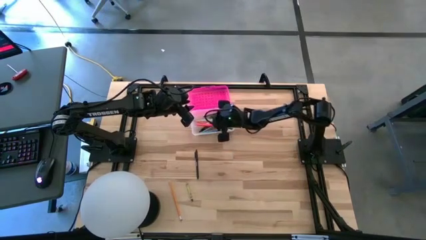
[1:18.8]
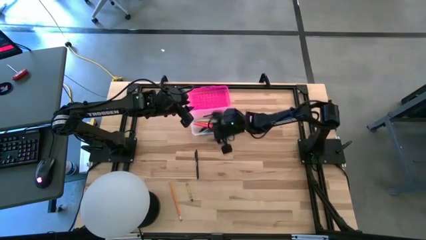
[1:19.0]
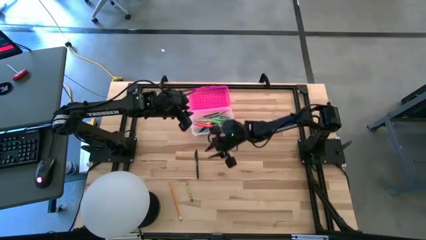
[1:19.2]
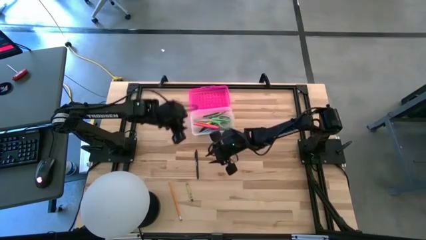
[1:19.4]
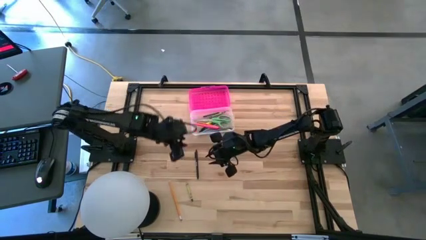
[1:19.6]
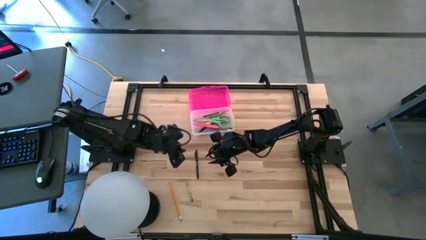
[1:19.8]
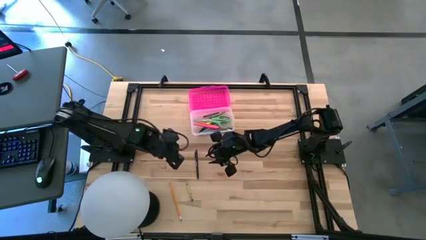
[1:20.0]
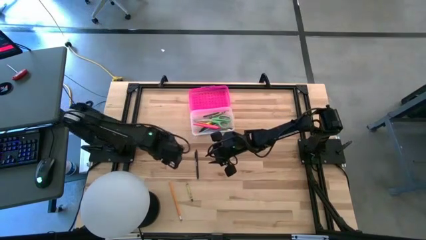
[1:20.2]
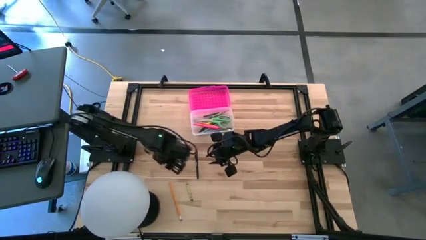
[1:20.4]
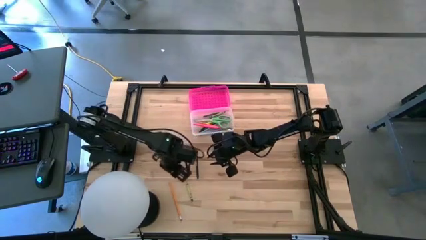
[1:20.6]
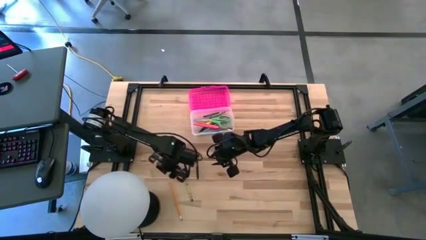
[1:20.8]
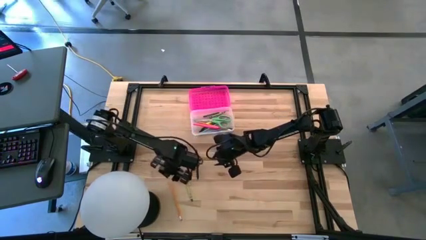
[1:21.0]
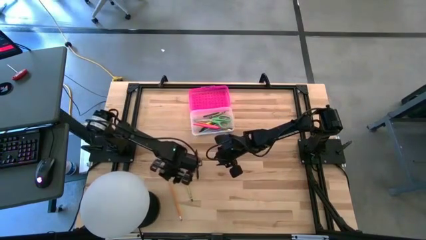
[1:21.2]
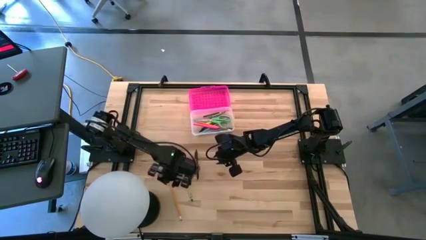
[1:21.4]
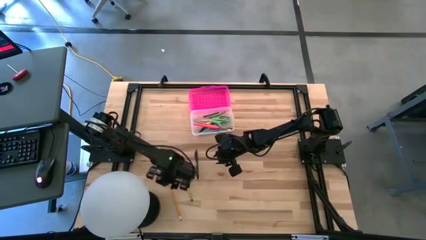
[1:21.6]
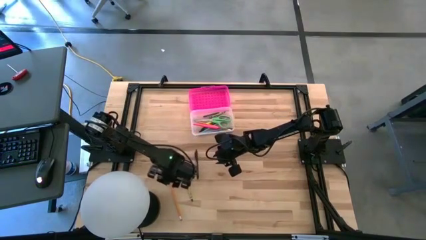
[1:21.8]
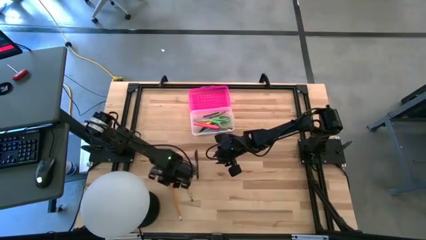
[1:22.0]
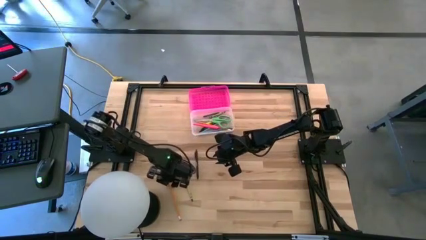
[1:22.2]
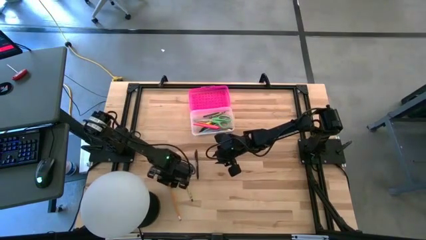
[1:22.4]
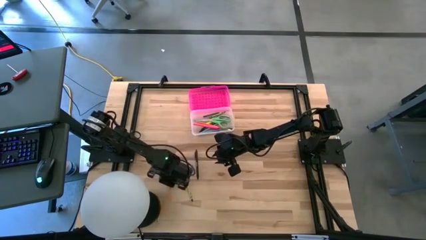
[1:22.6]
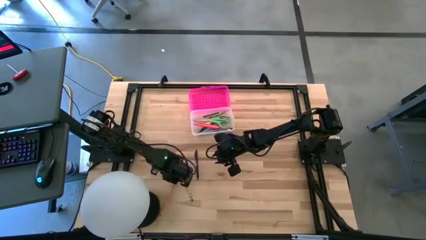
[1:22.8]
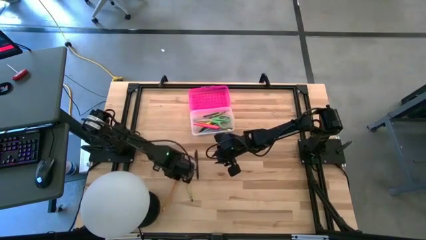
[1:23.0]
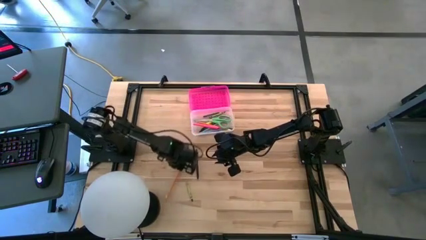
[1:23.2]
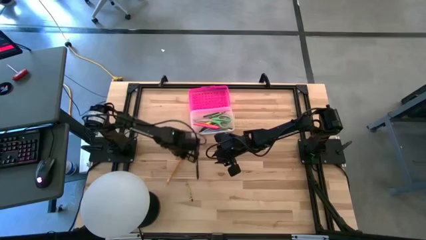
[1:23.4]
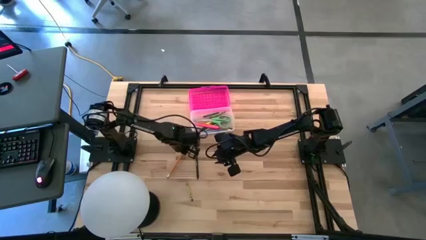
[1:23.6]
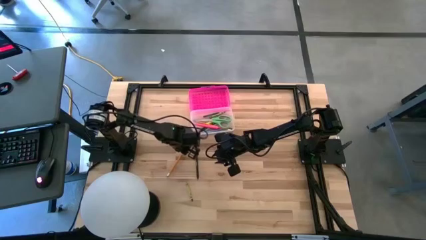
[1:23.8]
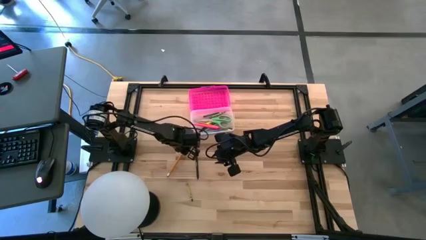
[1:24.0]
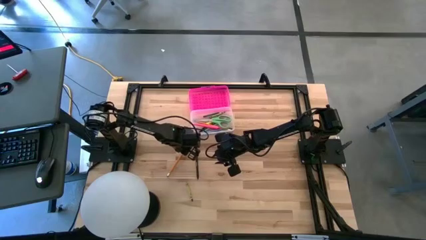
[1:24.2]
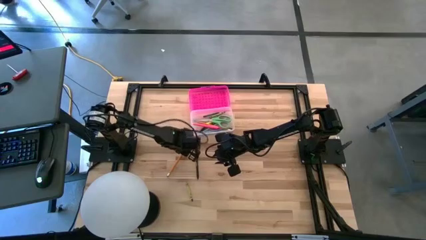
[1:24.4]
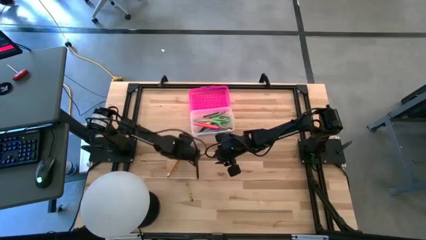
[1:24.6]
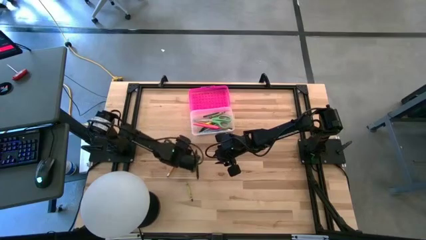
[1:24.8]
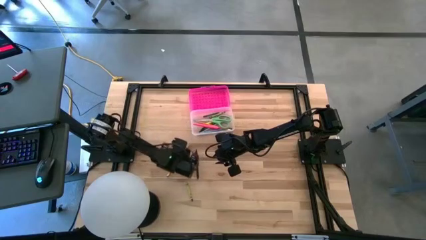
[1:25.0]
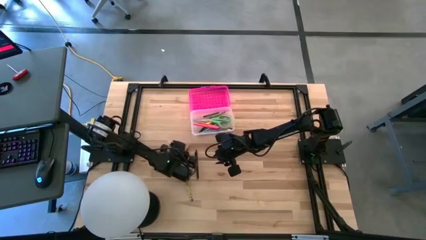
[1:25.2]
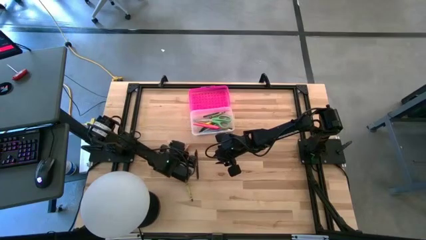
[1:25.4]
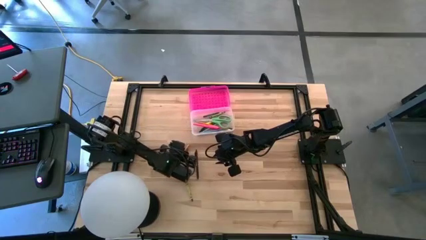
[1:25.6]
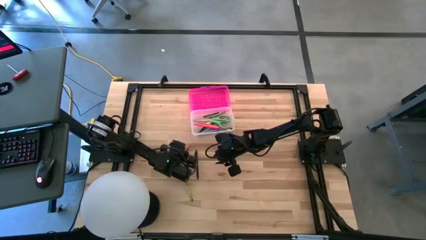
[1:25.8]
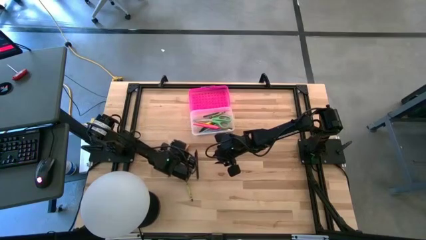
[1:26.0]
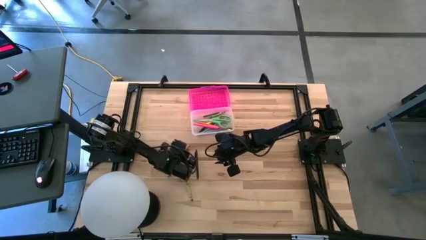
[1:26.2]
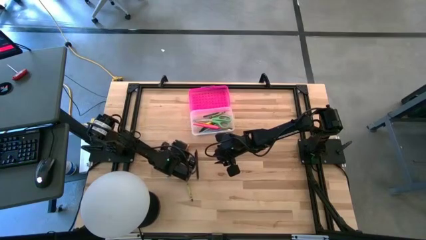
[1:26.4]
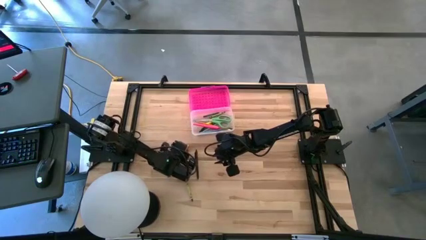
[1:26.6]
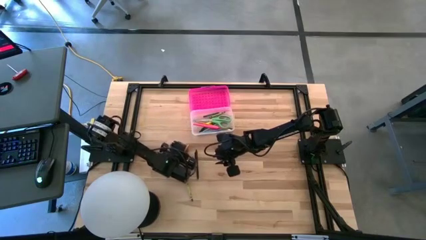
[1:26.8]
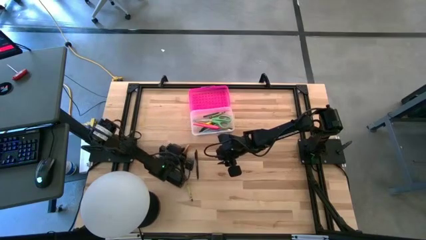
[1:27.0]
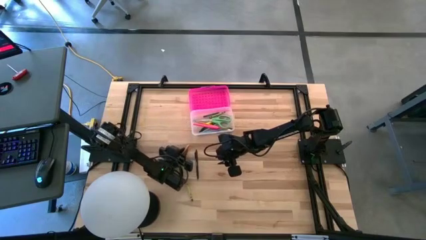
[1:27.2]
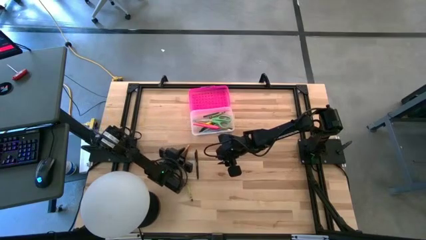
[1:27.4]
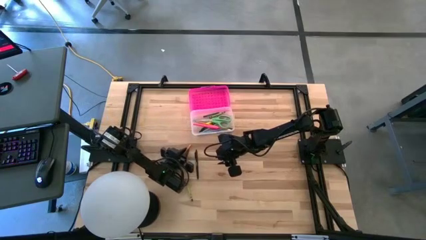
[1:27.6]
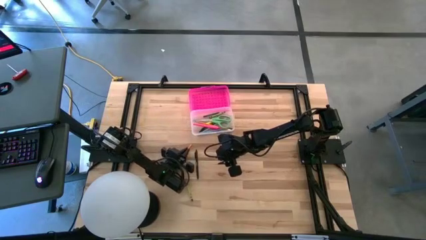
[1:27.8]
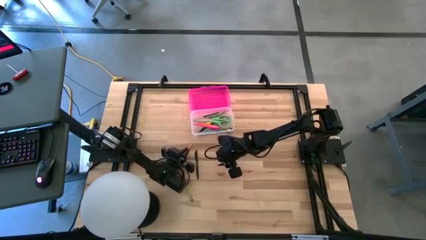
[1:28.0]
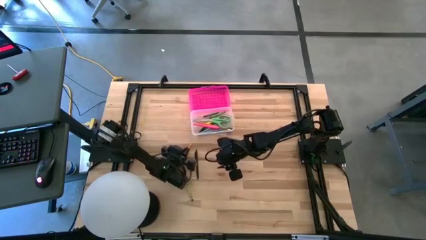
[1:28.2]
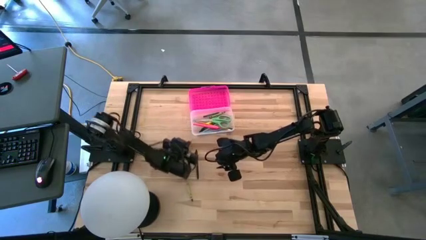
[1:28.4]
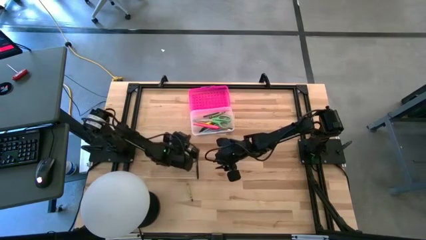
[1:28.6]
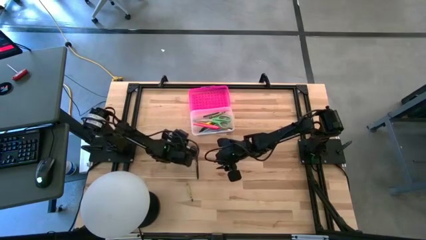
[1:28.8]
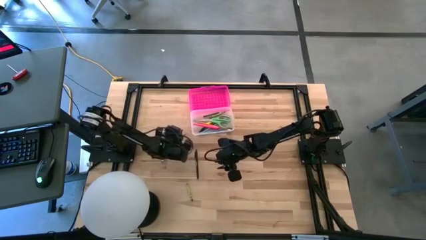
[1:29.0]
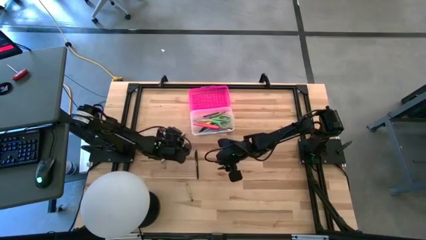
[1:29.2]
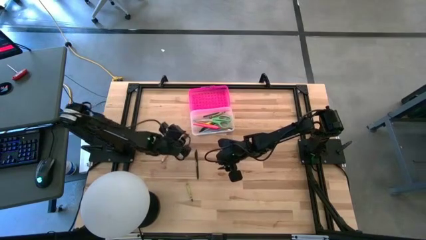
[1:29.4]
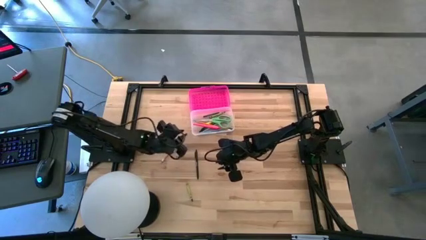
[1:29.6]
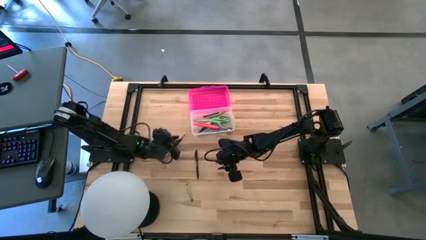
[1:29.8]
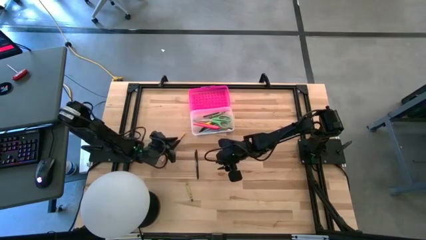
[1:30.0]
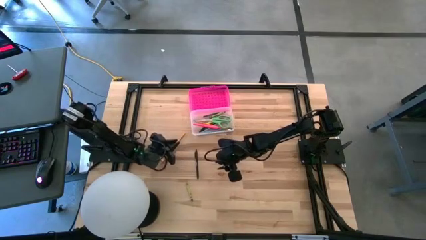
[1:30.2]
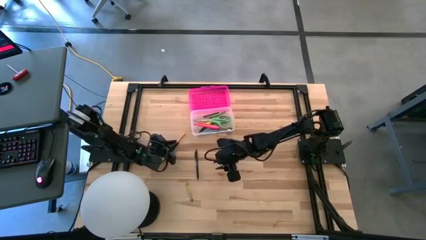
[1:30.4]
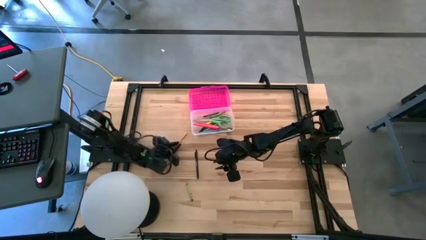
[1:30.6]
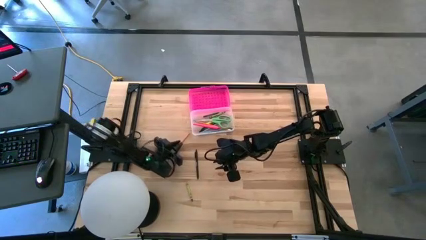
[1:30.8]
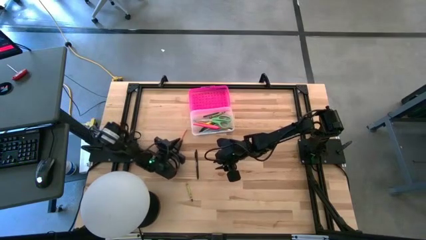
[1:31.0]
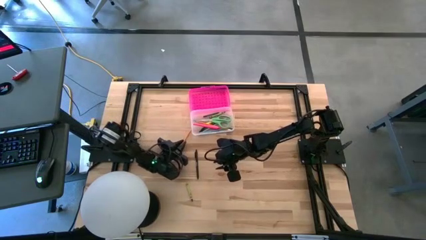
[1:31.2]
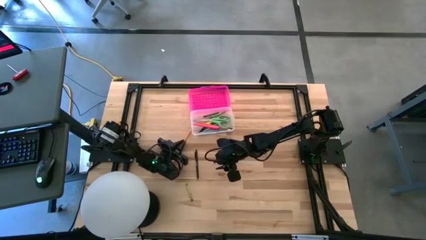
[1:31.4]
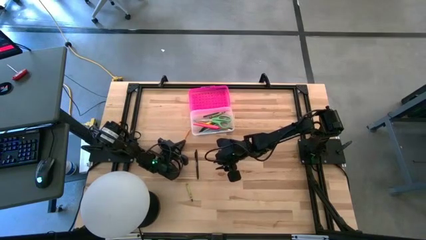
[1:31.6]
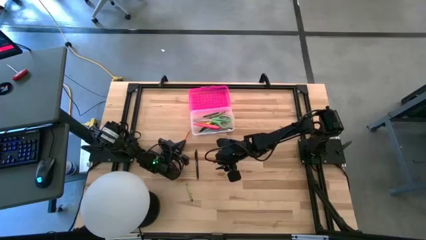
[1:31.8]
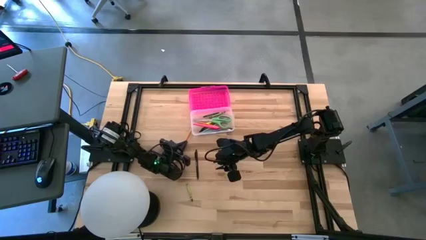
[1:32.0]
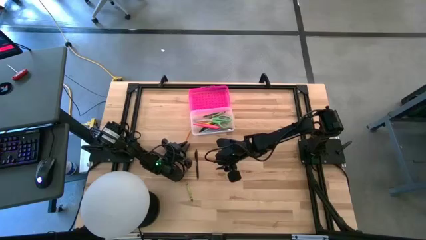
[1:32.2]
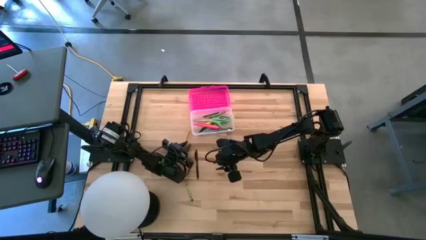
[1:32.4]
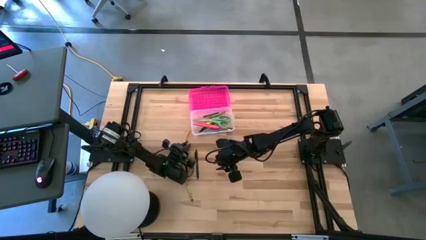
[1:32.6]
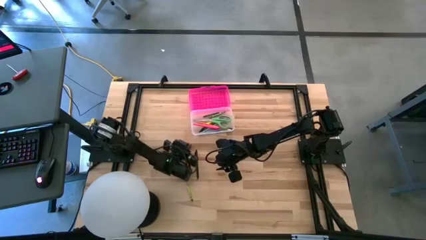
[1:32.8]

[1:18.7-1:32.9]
Task: Pick & place school supplies into a supply box
Put the orange pencil into the pink supply box

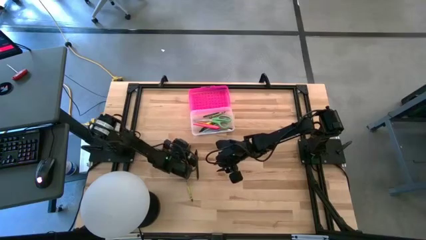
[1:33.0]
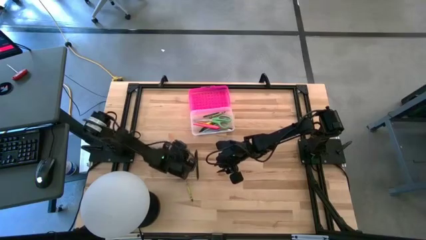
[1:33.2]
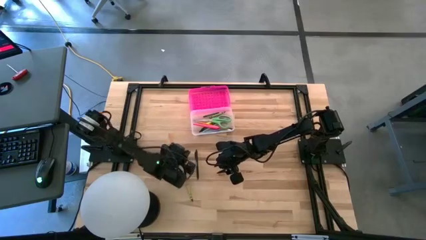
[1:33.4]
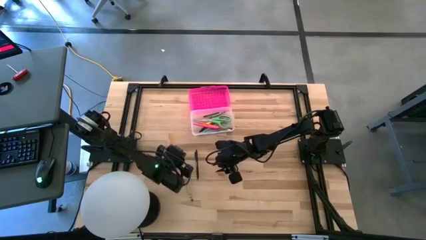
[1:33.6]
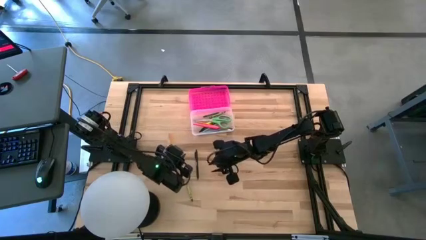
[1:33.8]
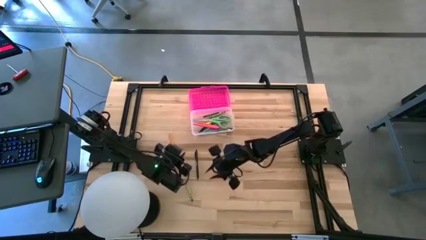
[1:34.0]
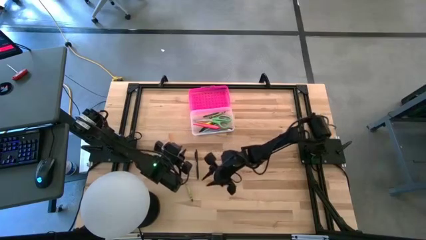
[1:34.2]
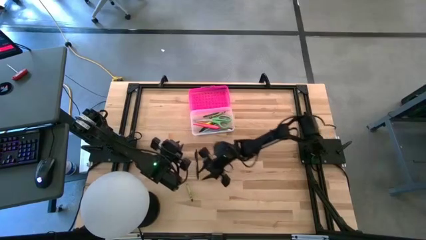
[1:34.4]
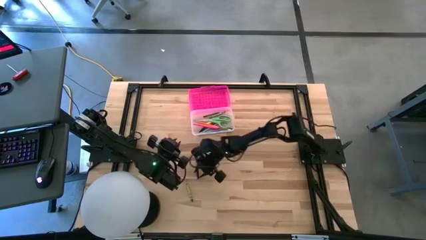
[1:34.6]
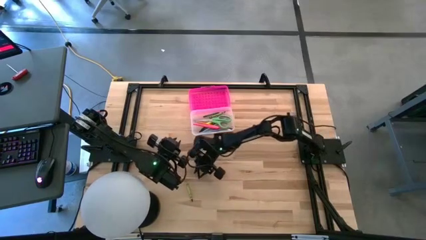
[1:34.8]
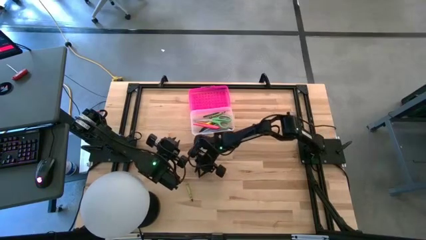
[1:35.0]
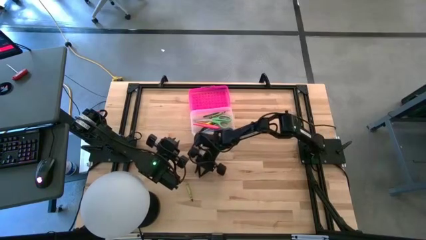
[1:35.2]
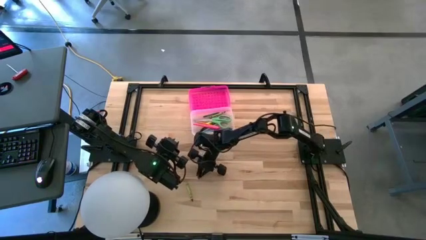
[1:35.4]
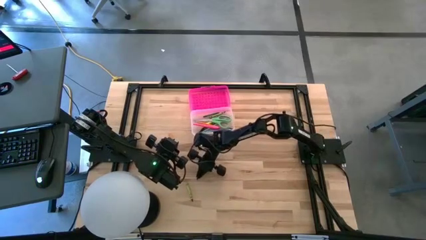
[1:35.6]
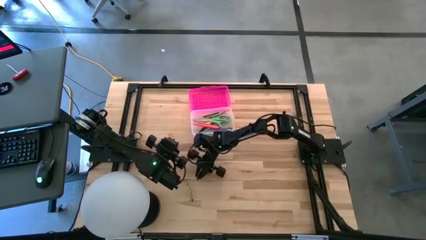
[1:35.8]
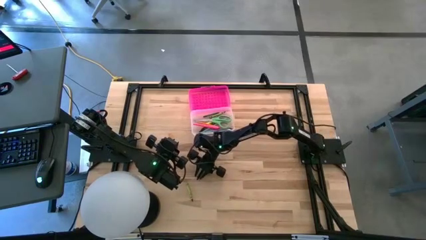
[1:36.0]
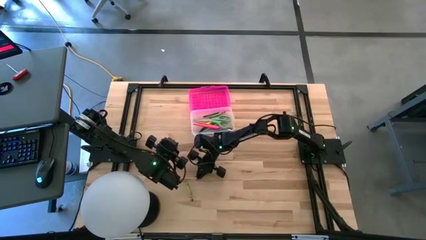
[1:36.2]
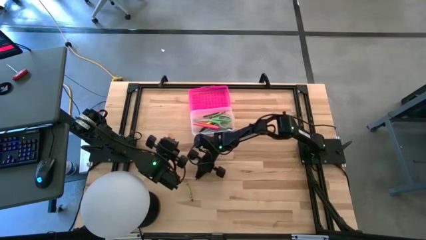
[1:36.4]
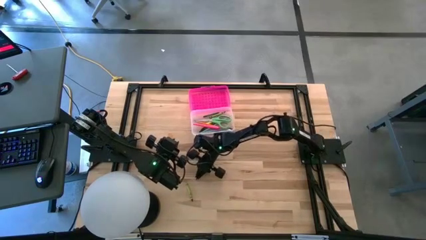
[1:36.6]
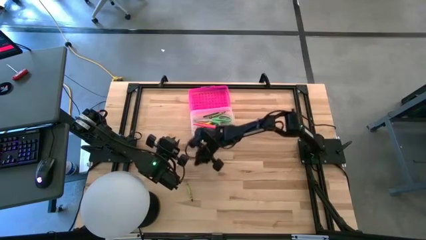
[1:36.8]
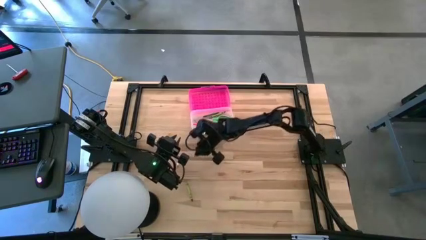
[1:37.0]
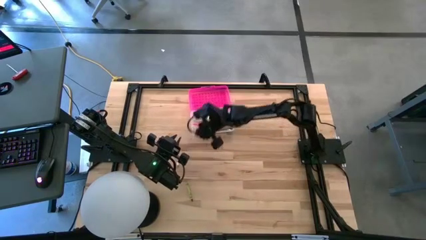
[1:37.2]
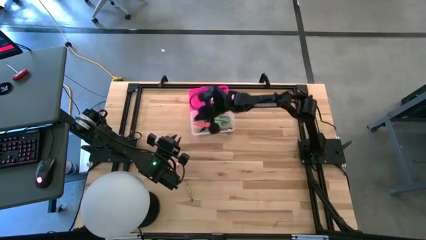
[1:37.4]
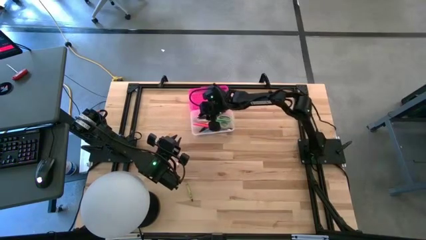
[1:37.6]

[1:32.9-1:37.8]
Put the black pen into the pink supply box
